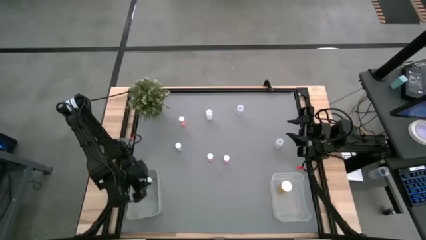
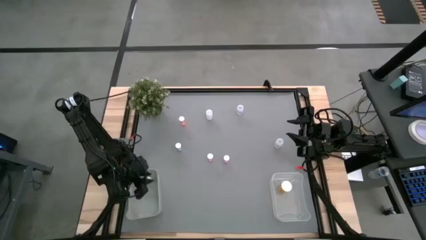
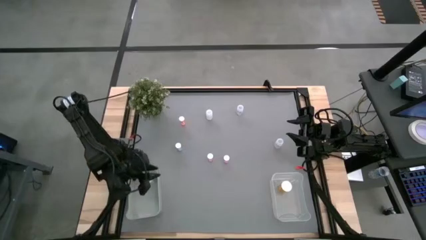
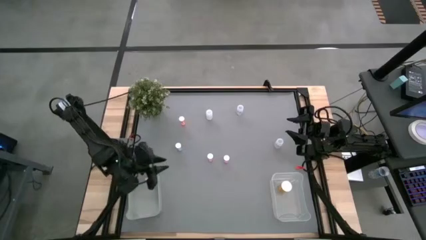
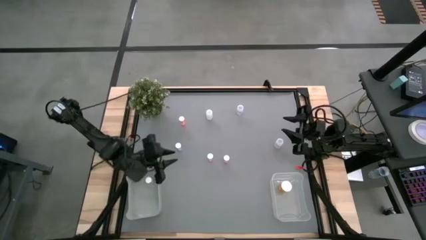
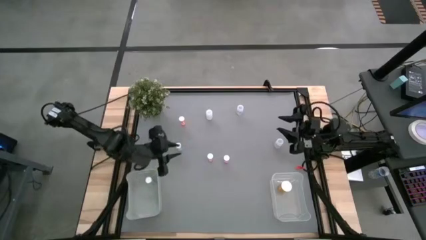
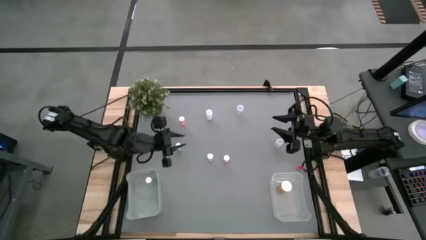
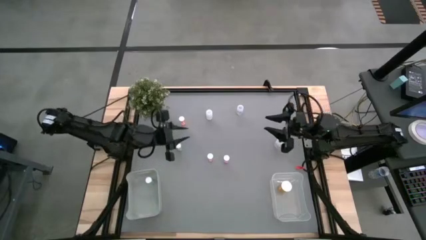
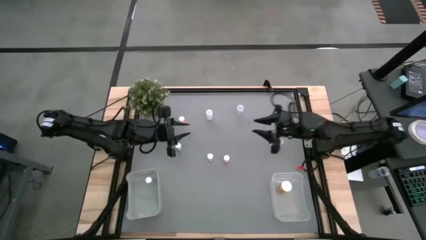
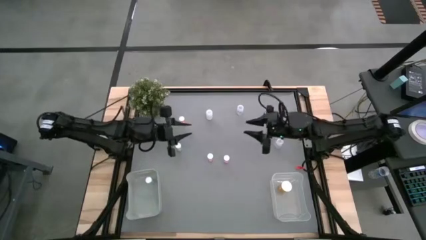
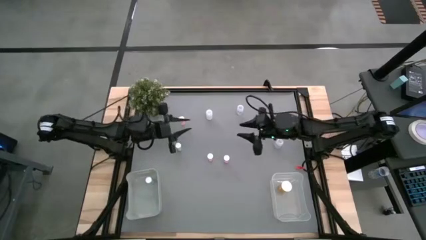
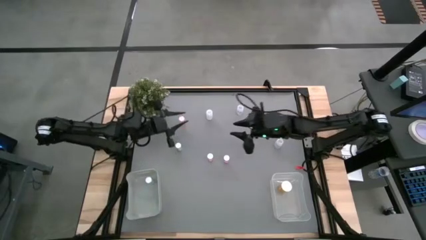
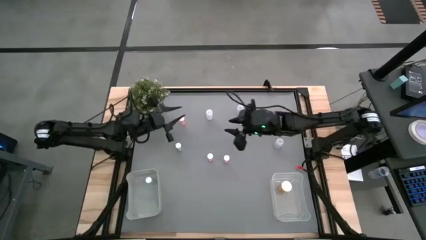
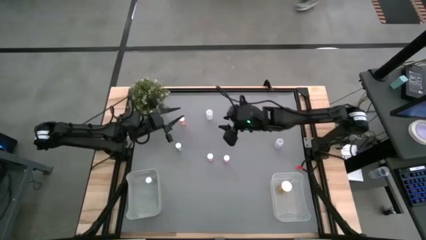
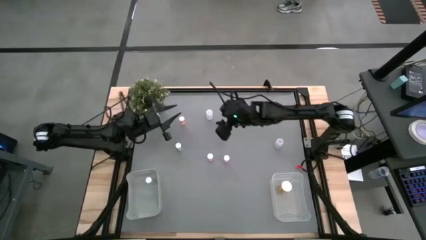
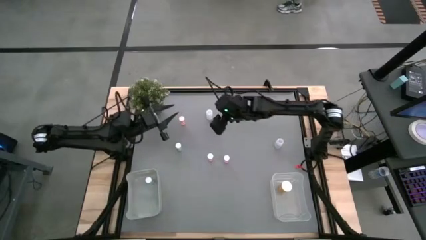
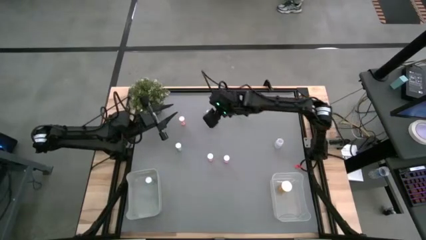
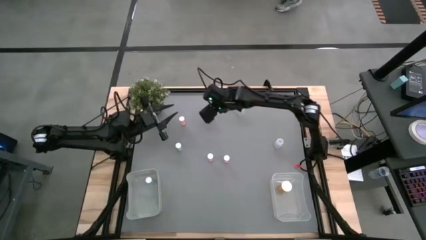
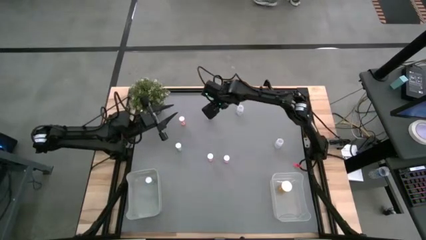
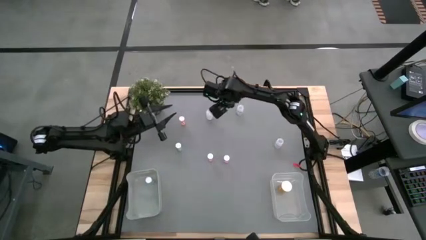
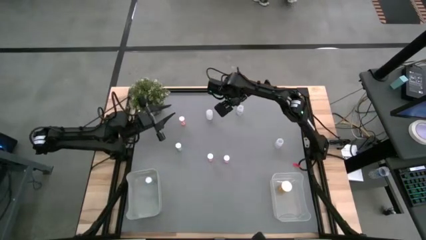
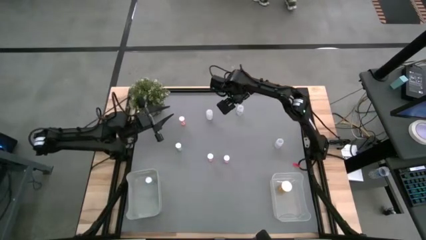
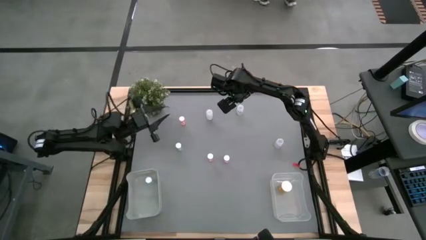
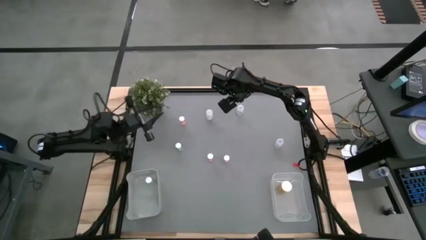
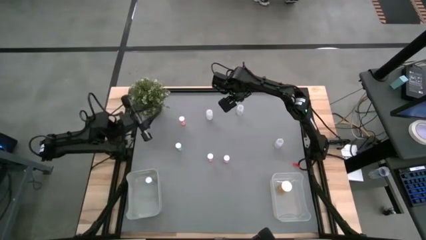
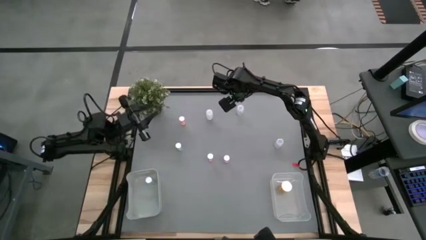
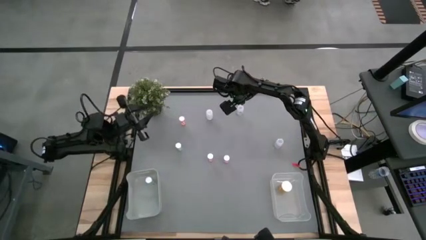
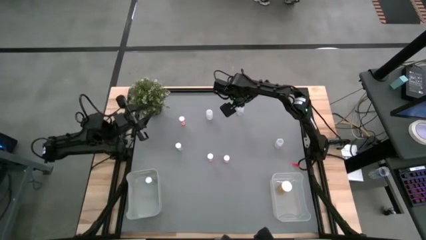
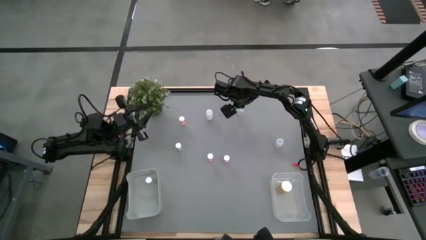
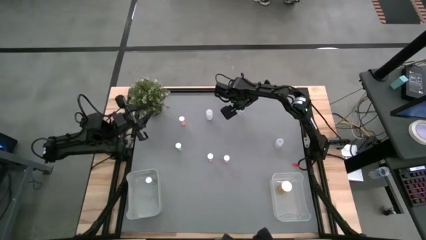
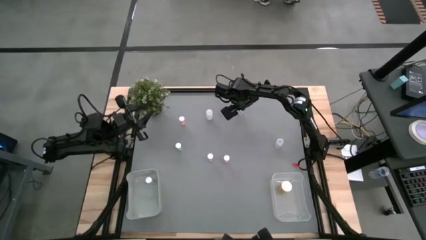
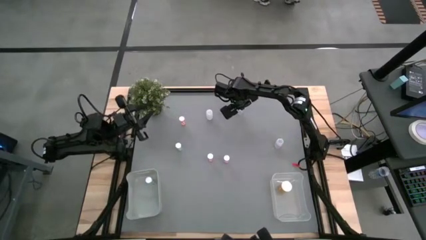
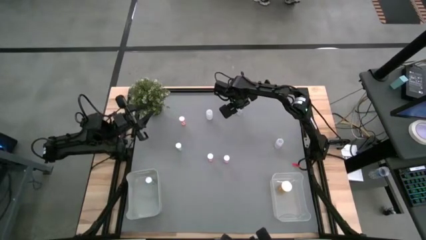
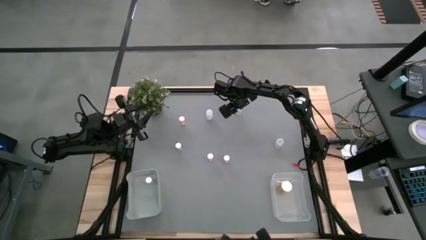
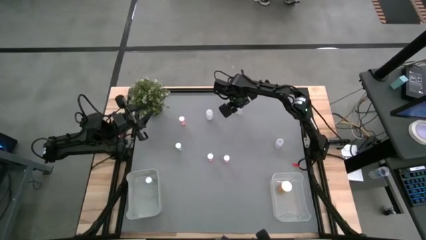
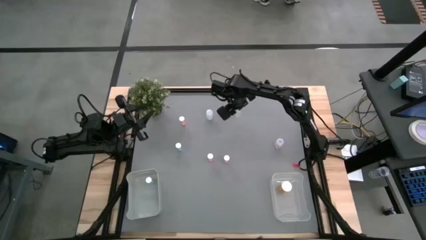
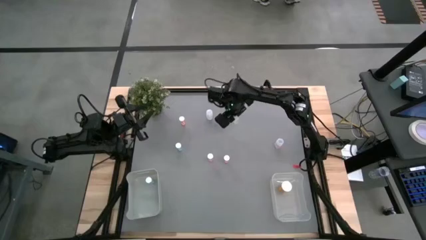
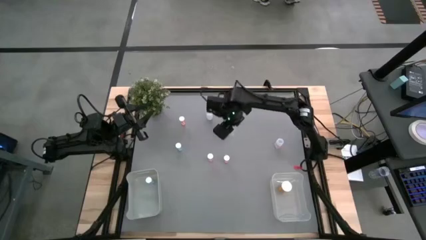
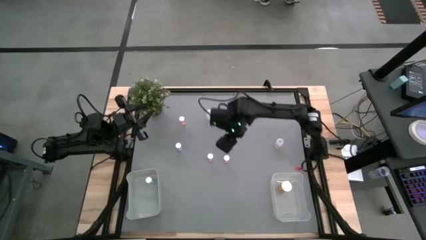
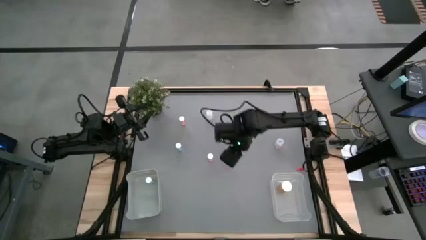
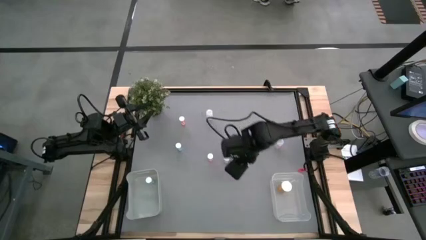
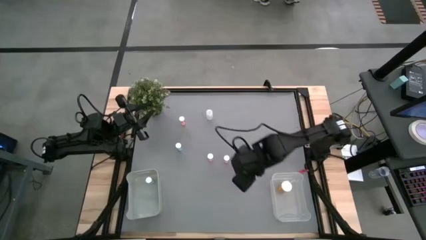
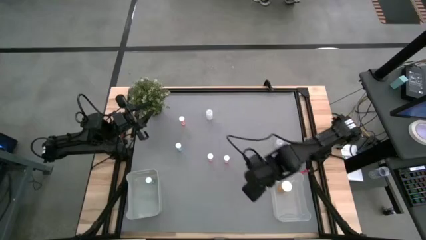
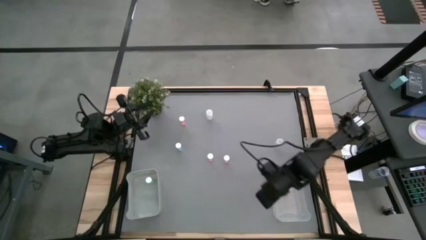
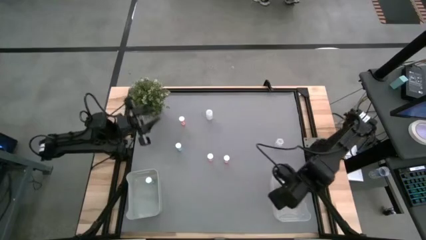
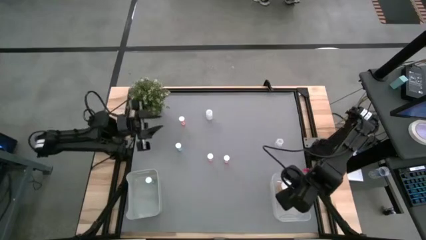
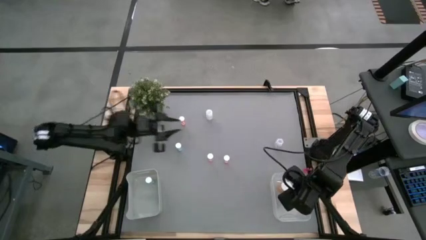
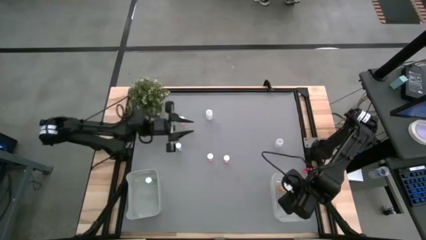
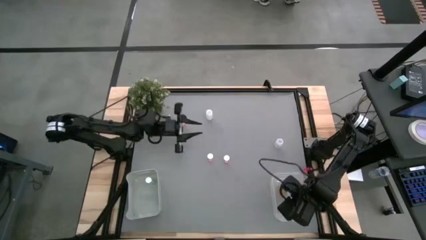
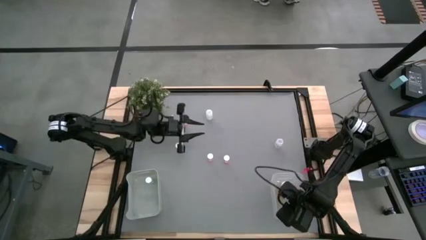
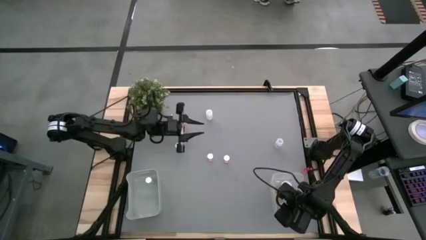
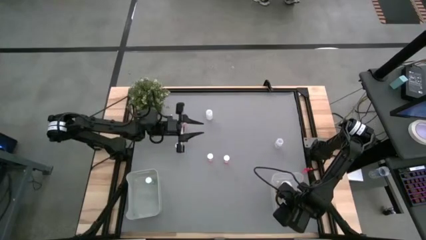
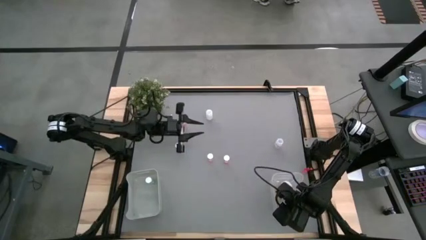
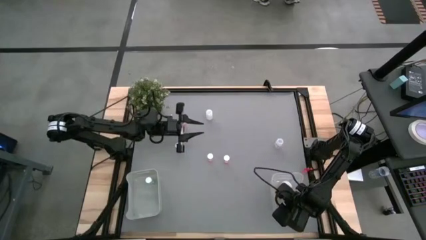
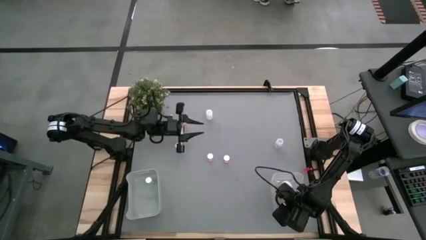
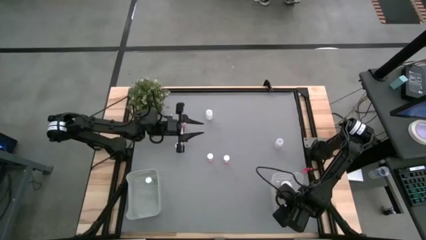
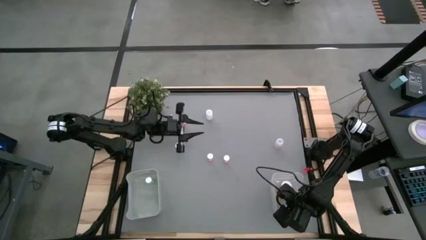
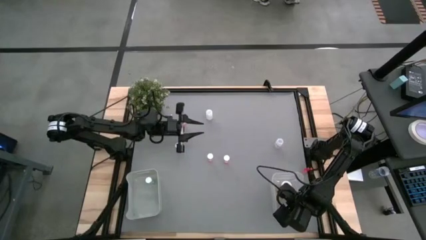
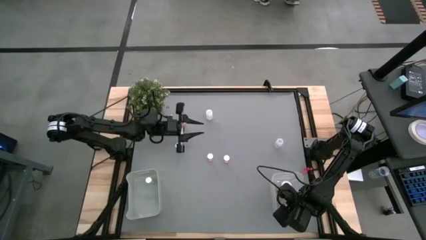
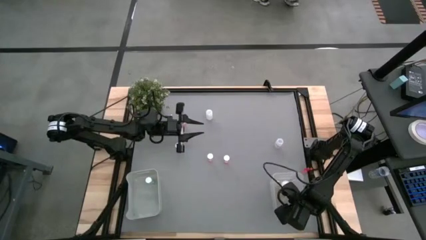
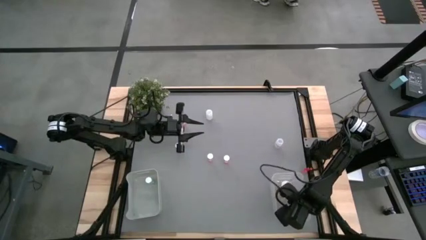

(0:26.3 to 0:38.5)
Task: Pick and place medicine bottles into bin by pill shape (circle, oval)
Put the left transparent capsule bottle into the transparent bin

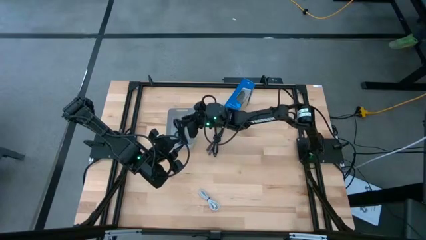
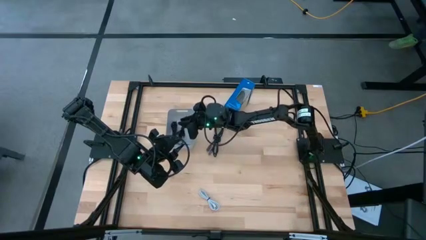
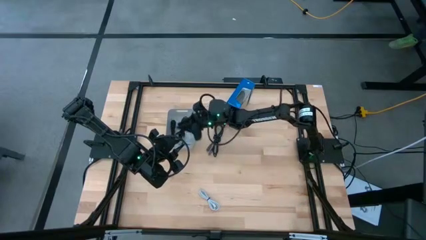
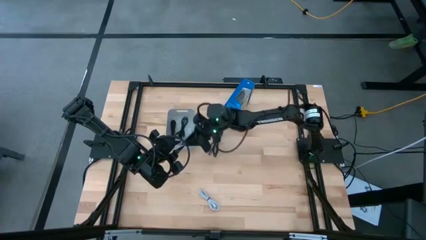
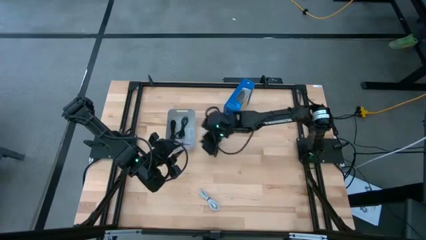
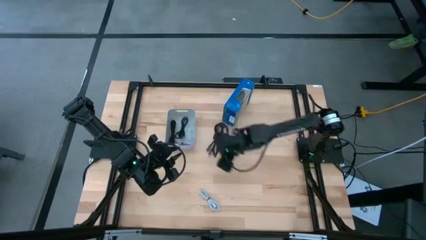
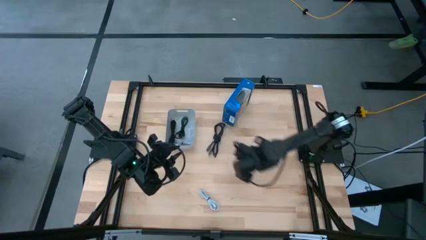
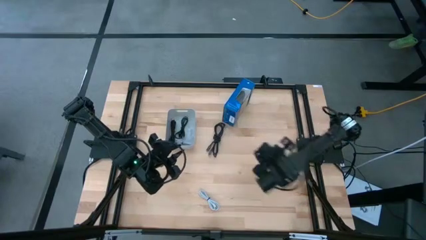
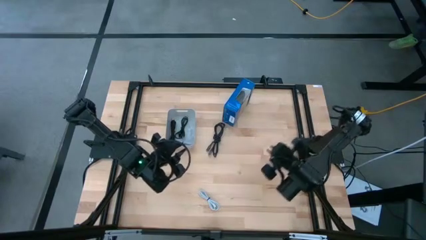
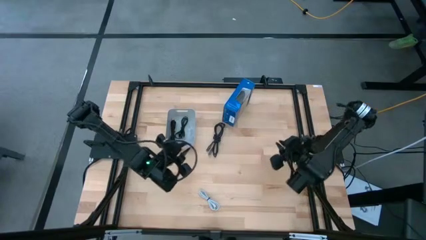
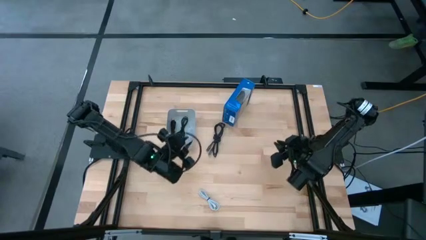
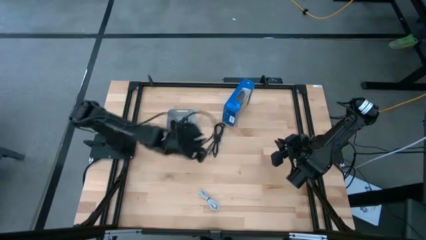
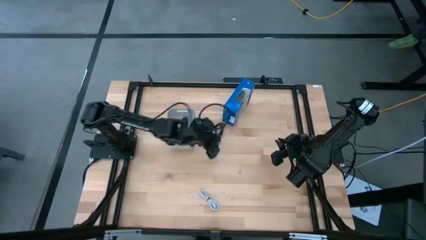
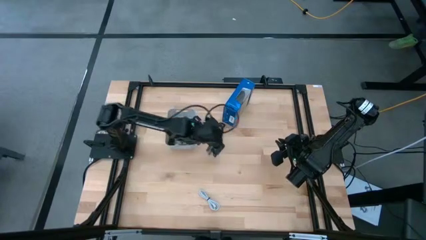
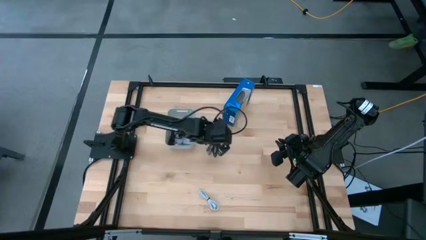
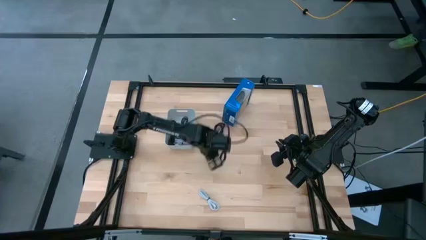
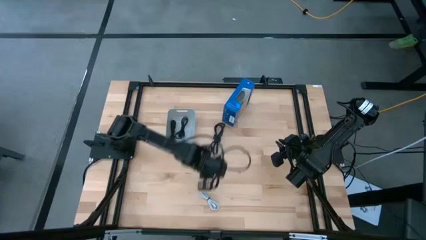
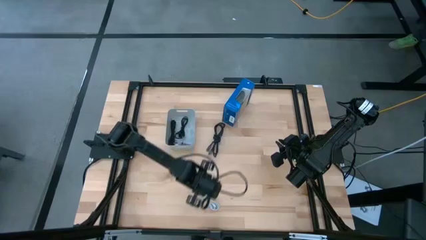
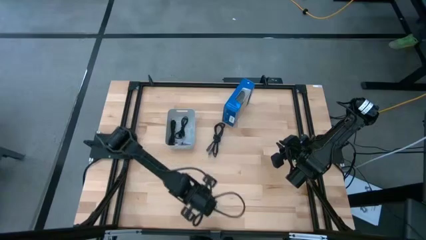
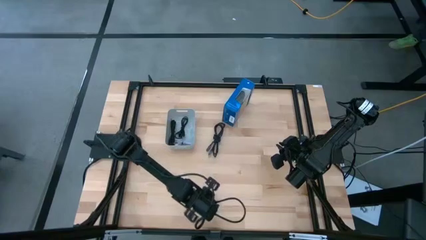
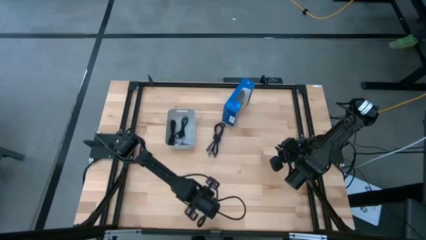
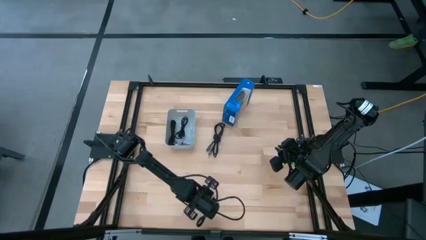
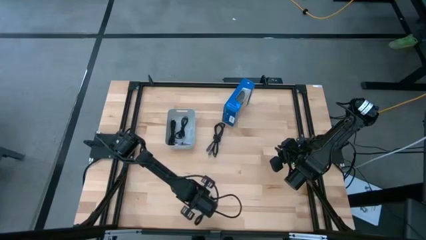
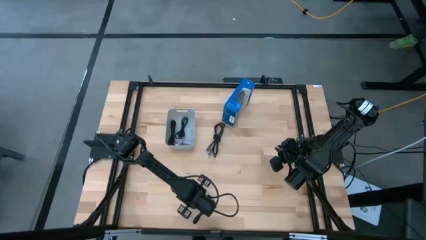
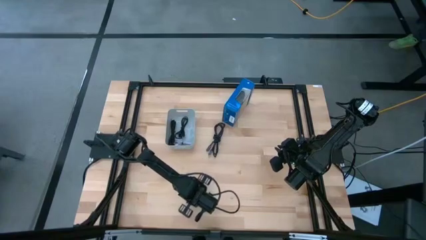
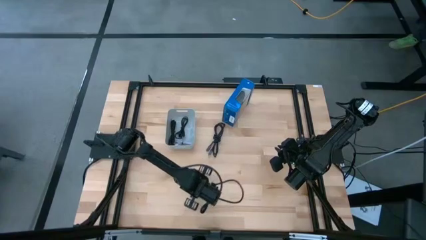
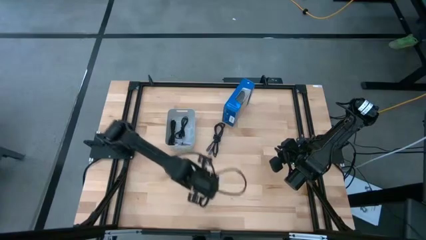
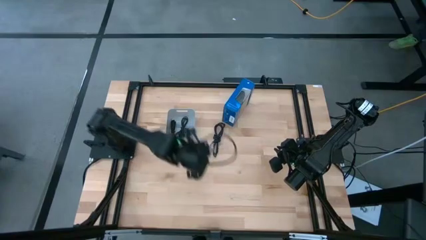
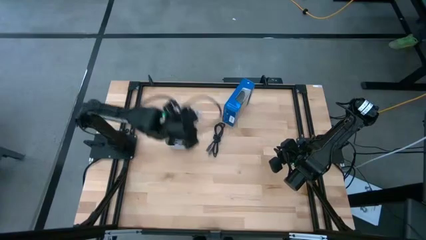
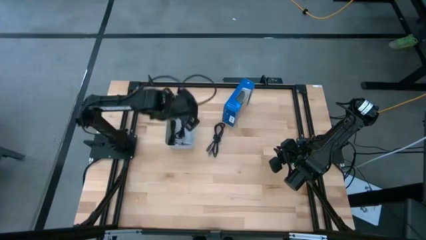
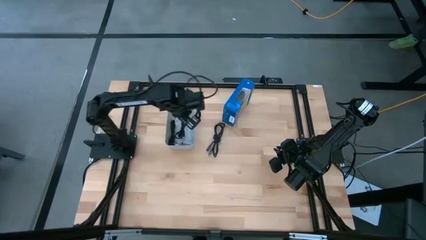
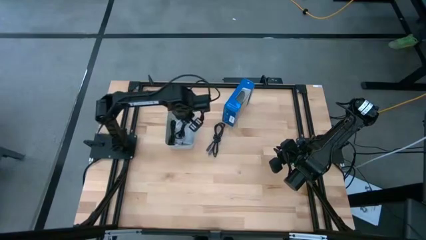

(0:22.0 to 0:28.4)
Task: Pick and place USB-C Cables
Put the white charger cable into the white bin
